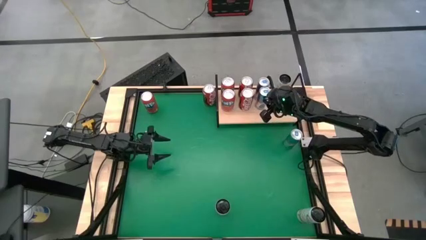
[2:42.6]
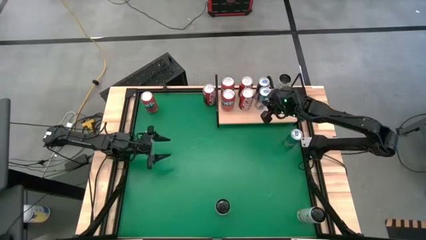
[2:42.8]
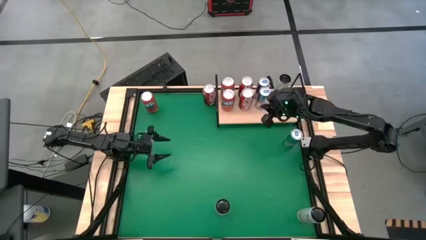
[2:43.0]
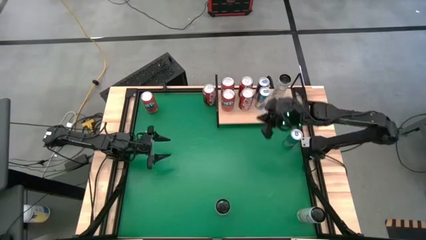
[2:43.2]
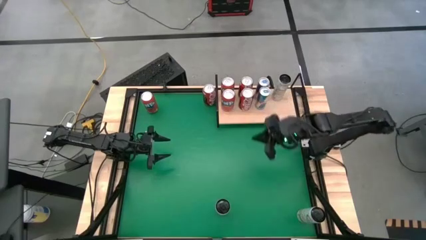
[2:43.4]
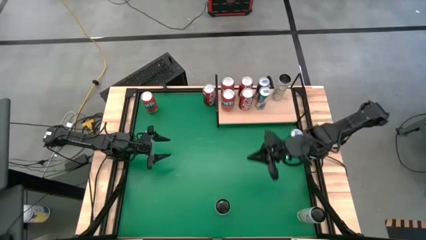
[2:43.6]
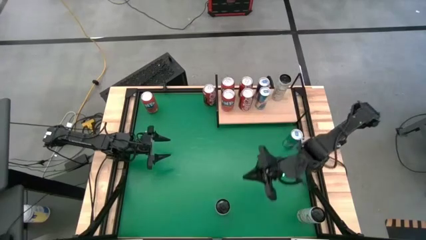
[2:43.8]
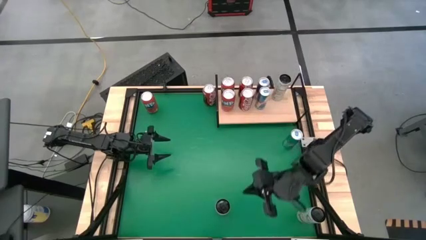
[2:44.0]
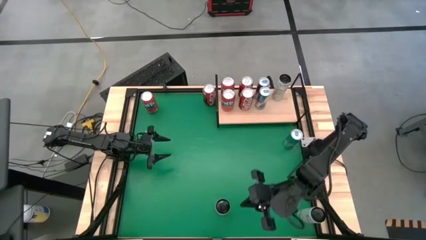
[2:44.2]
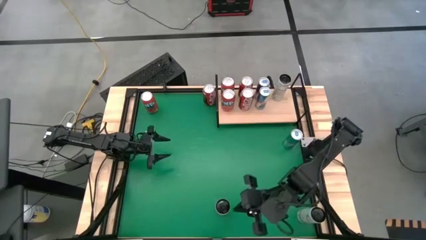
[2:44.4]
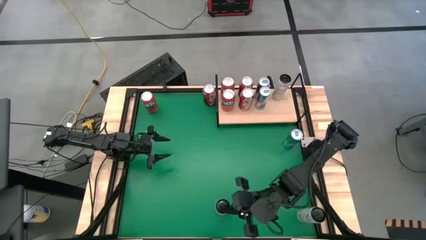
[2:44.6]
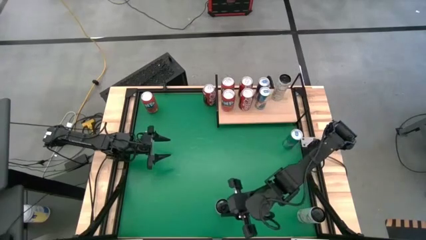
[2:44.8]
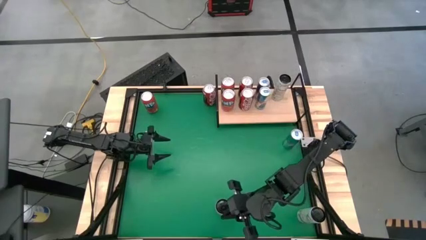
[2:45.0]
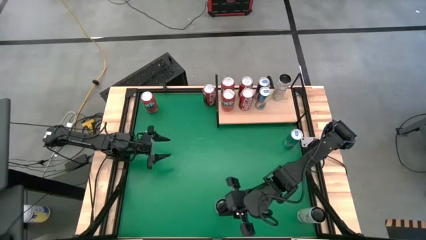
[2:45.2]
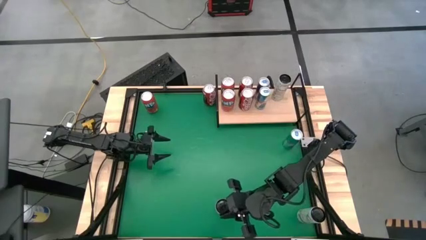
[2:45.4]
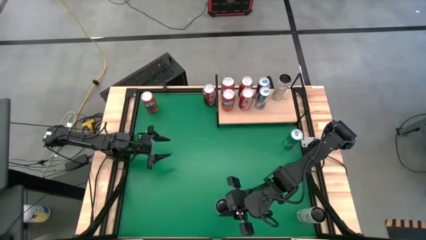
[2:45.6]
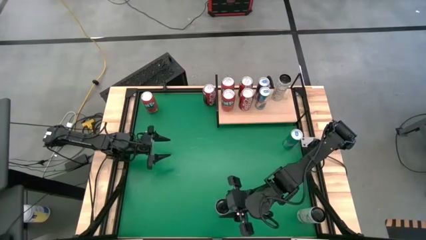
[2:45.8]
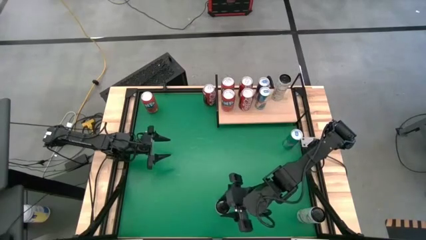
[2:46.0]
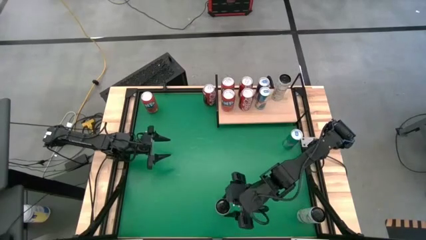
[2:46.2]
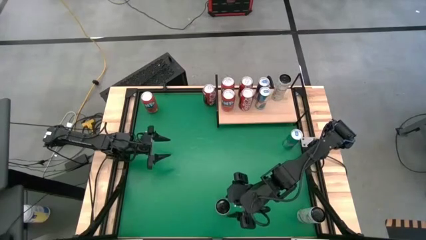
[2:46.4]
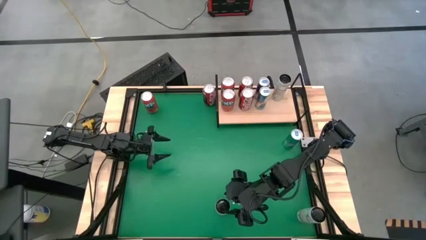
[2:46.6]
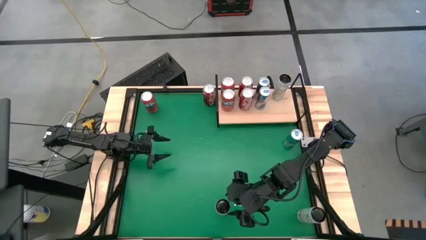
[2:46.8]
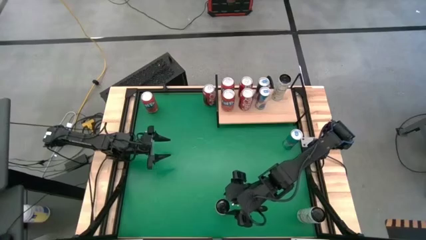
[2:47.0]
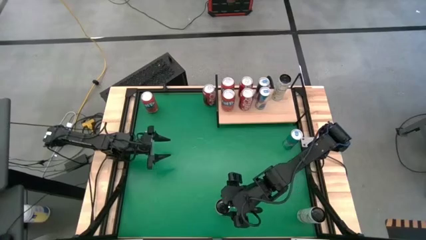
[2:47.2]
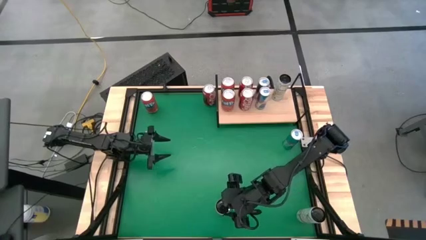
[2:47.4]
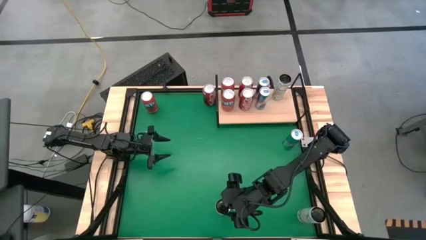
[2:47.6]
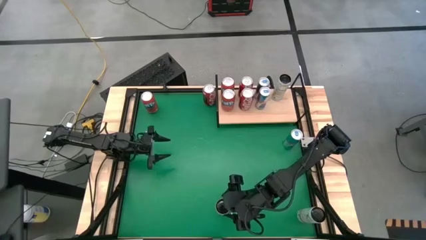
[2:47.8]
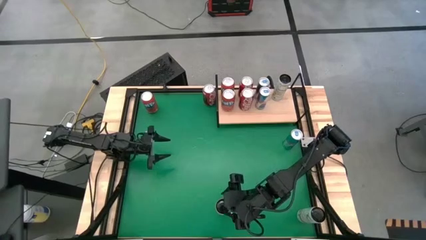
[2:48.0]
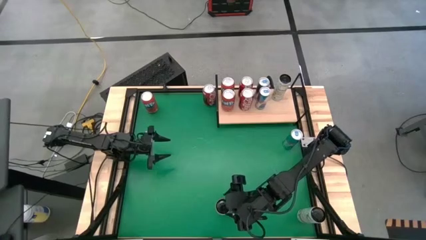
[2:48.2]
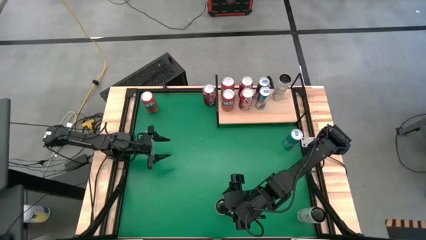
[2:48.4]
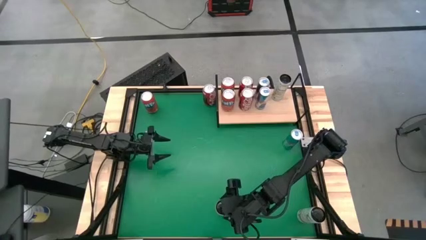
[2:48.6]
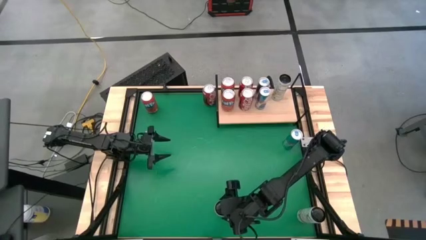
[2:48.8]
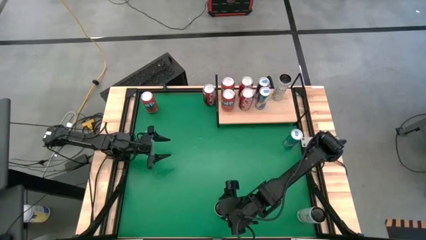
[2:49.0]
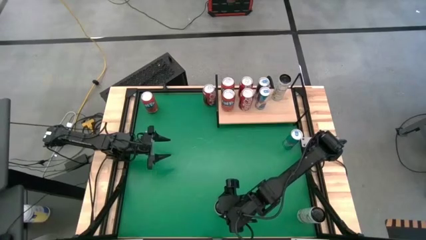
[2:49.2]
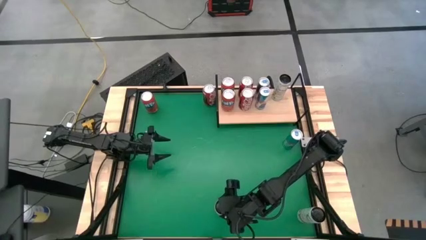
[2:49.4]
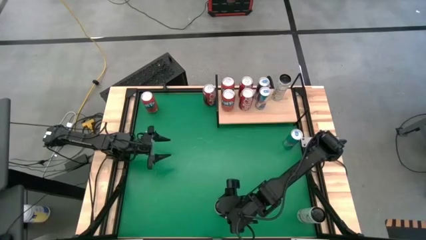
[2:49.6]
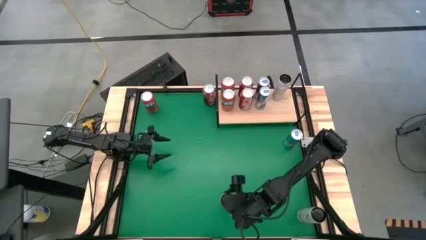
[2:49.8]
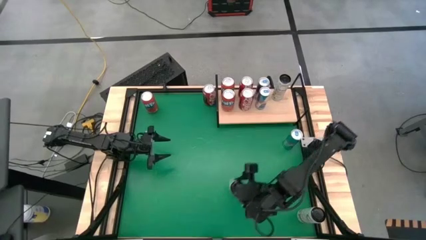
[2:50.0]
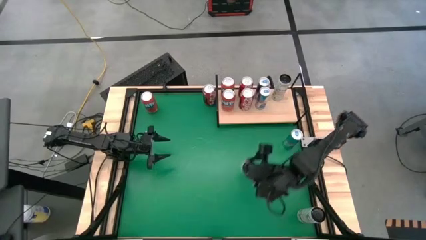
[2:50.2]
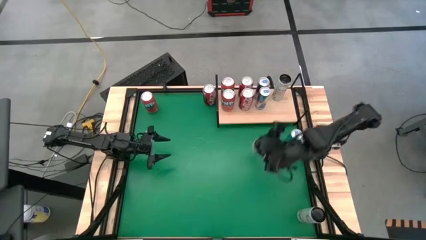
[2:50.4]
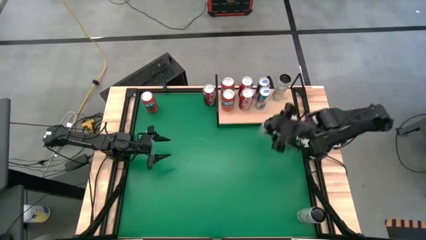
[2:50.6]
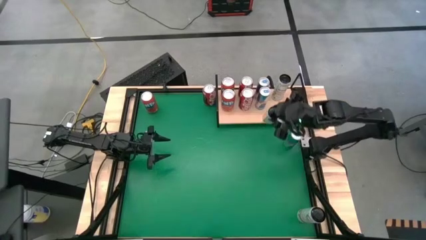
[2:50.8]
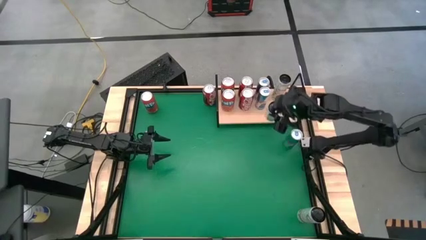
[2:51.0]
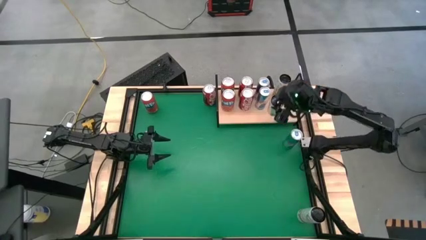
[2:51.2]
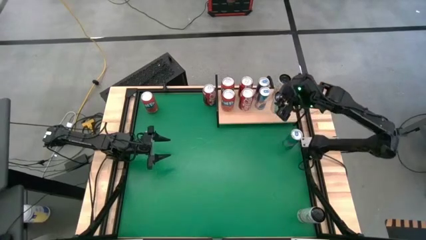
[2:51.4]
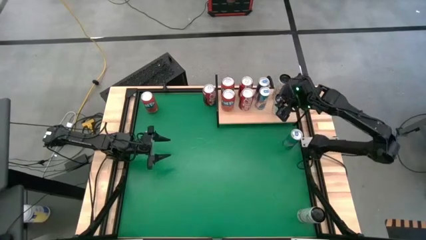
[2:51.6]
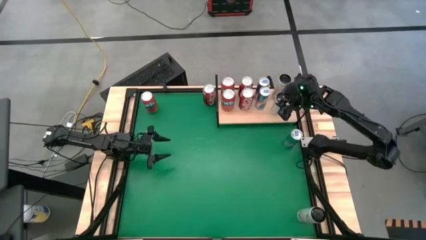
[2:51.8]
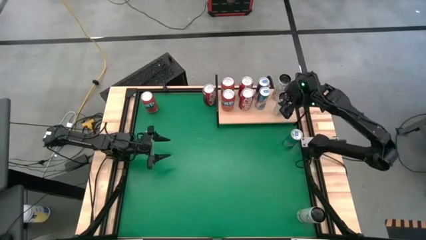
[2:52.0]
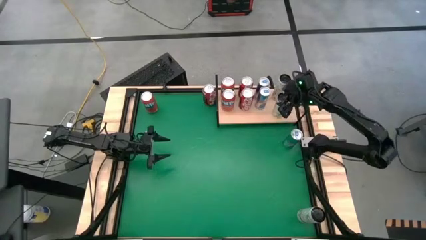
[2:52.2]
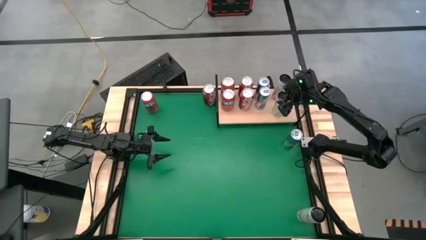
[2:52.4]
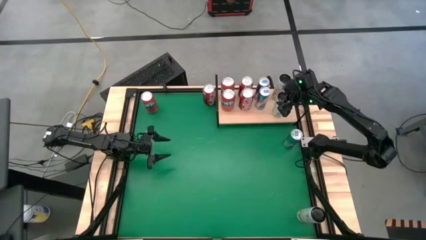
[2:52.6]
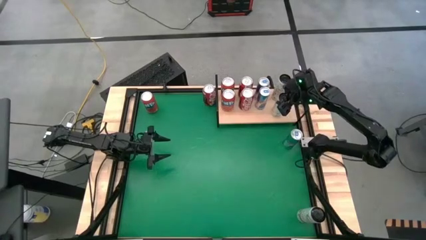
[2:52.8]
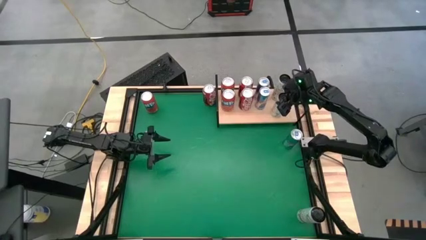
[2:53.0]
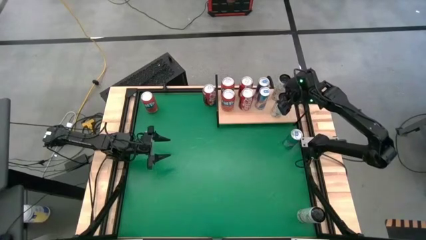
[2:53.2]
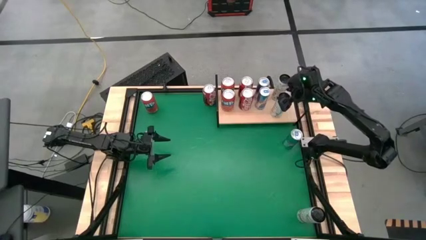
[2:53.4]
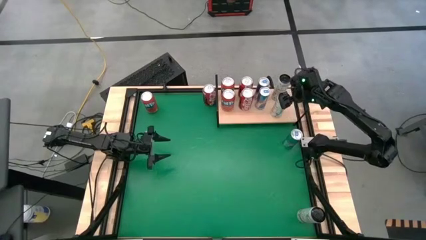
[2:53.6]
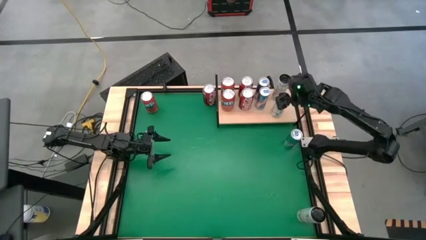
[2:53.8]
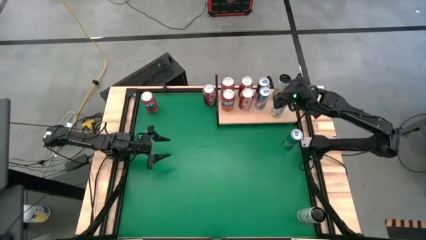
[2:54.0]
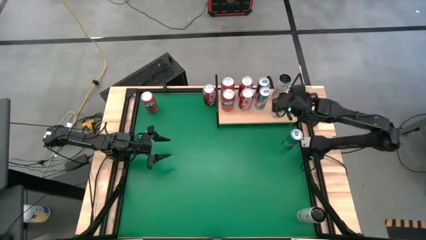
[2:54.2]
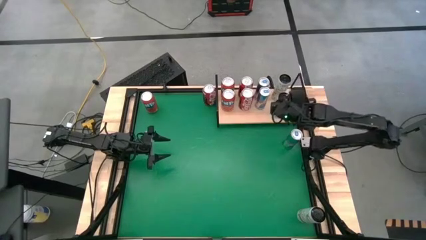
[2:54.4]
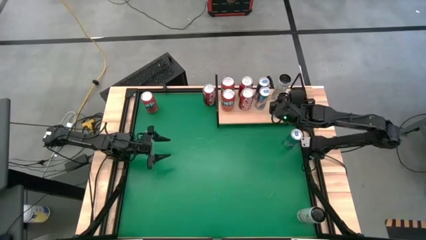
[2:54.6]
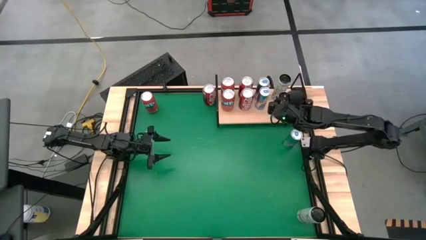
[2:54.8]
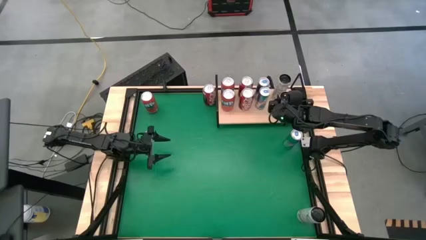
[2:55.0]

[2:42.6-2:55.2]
Task: Place canned beverage on shelf
Put the left yellow soda can on the shelf aligned with the other yellow soda can
